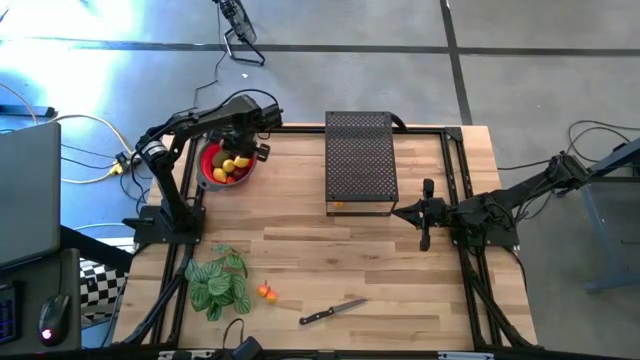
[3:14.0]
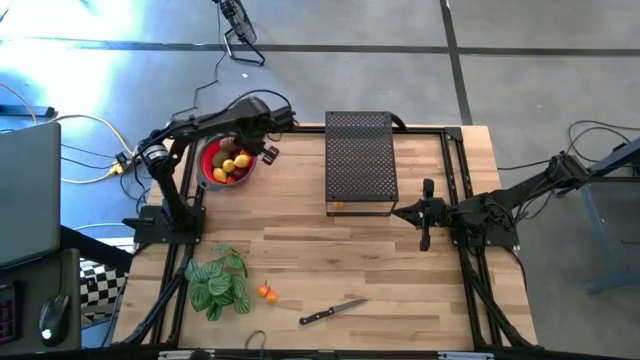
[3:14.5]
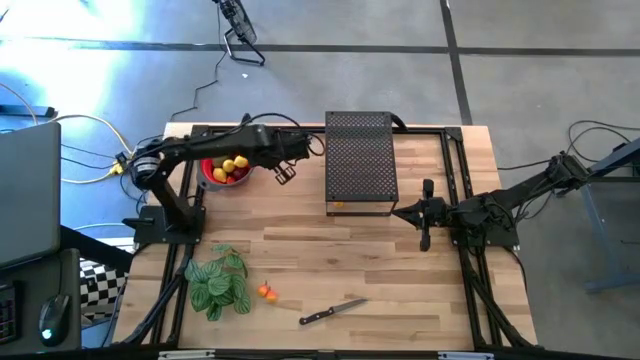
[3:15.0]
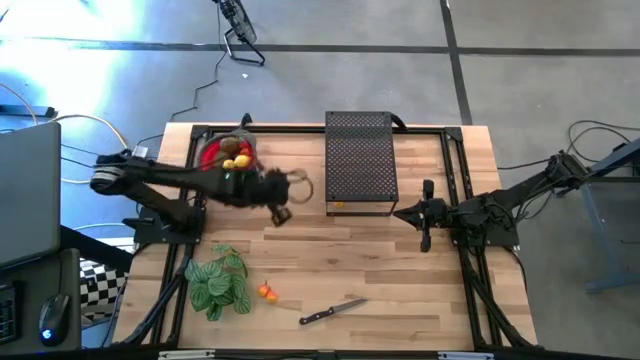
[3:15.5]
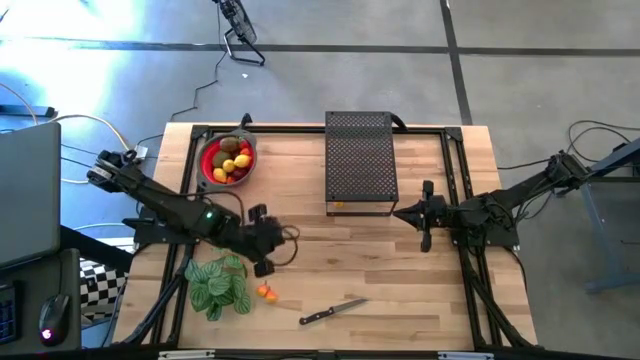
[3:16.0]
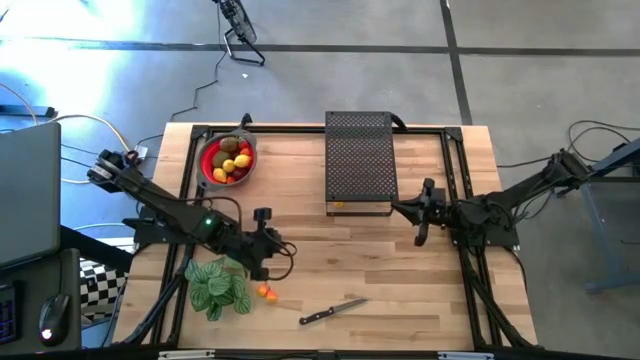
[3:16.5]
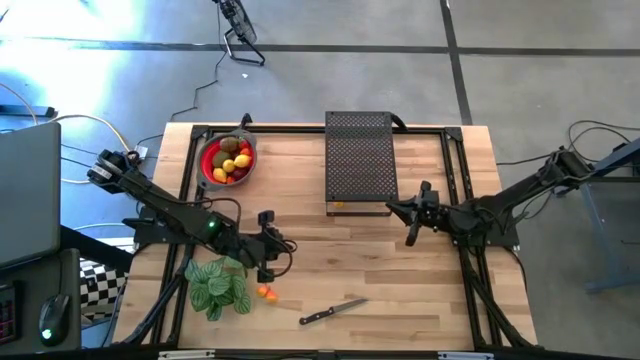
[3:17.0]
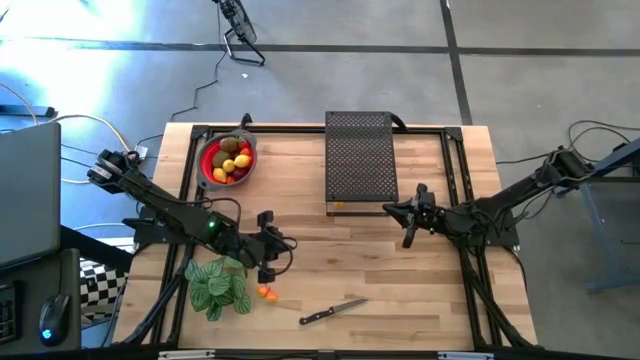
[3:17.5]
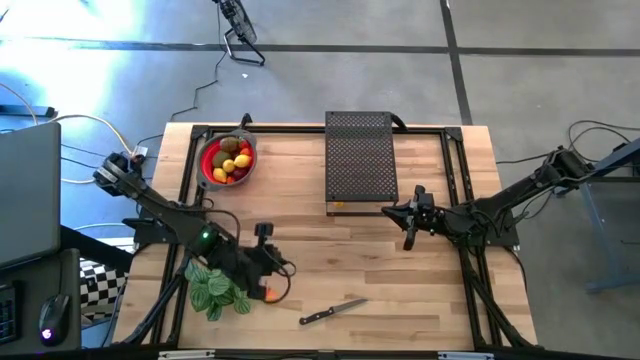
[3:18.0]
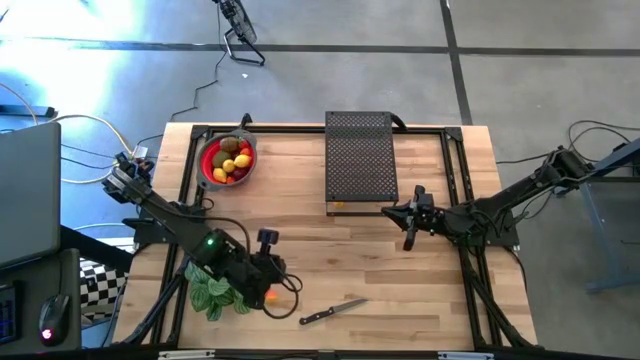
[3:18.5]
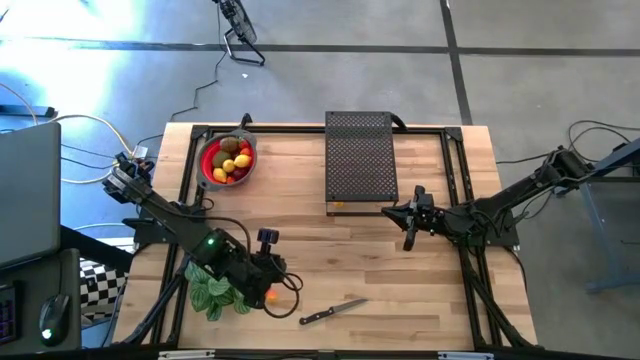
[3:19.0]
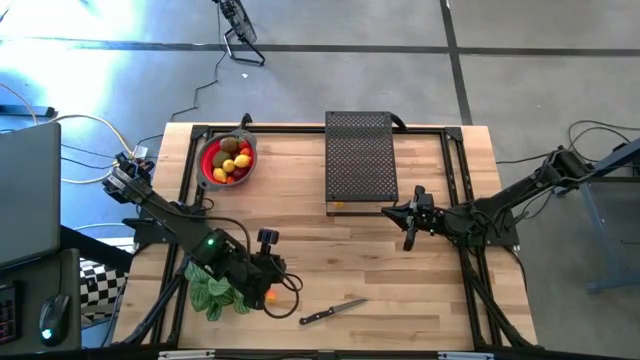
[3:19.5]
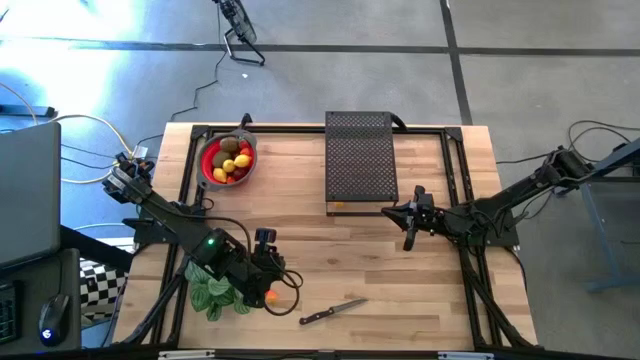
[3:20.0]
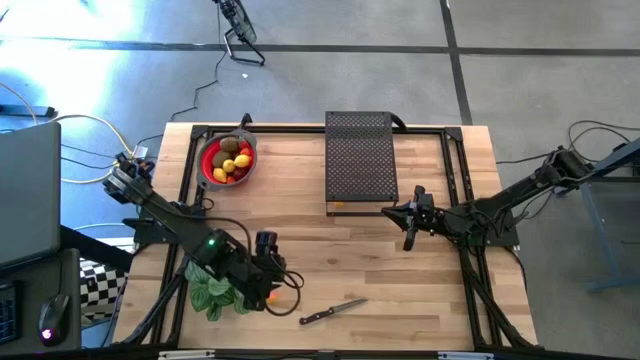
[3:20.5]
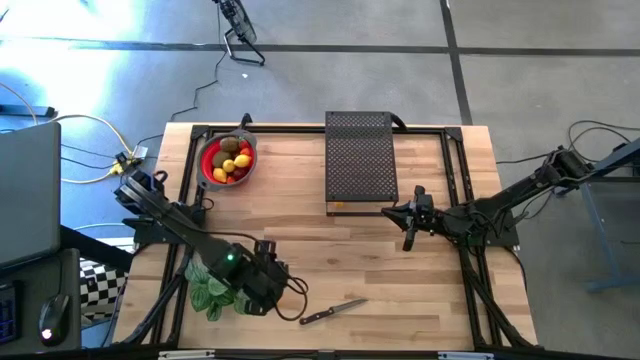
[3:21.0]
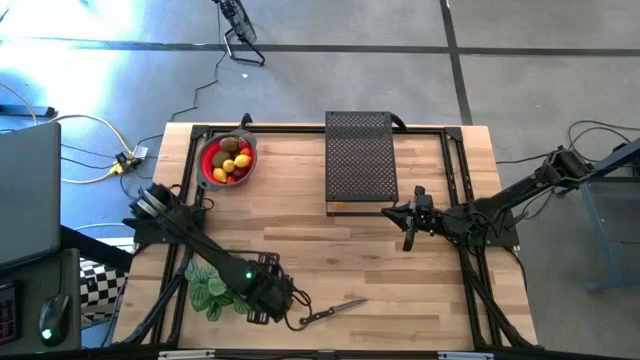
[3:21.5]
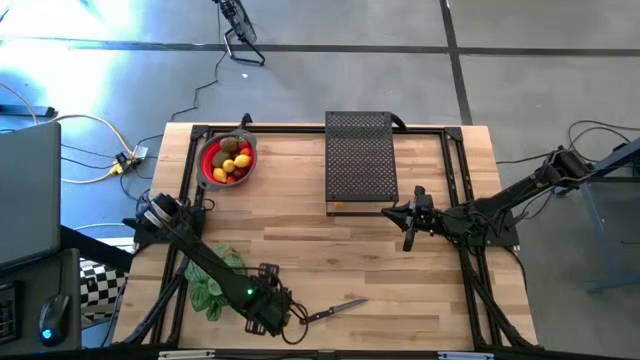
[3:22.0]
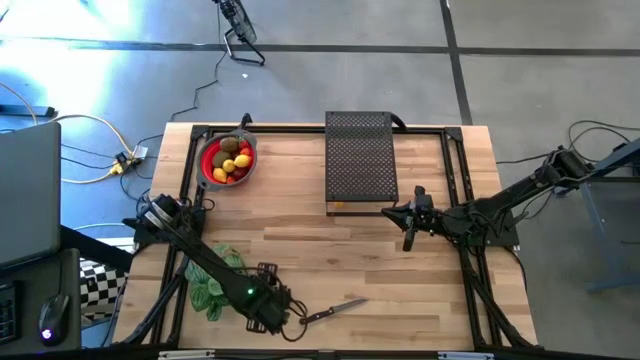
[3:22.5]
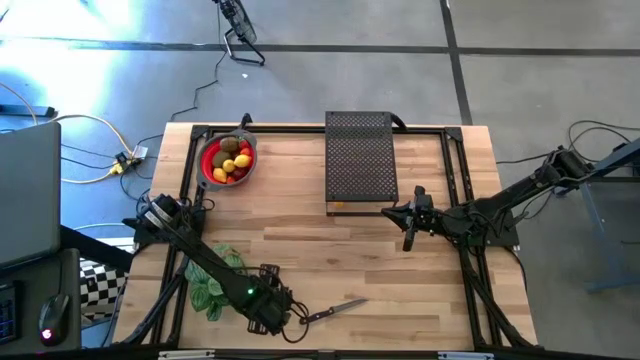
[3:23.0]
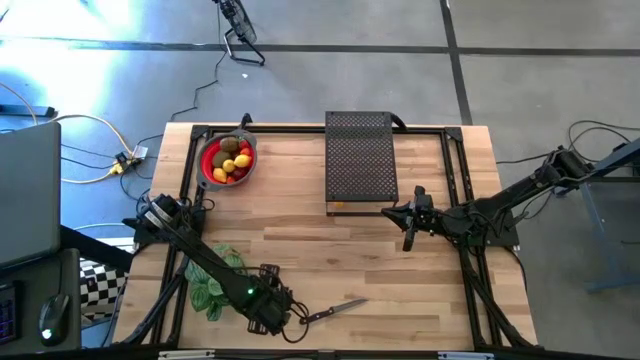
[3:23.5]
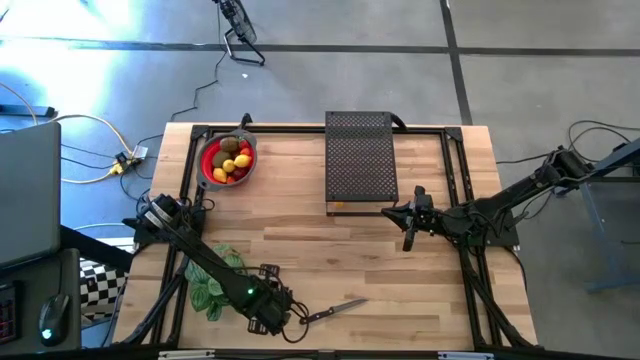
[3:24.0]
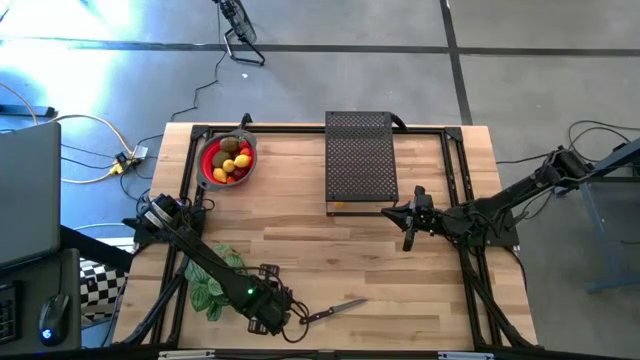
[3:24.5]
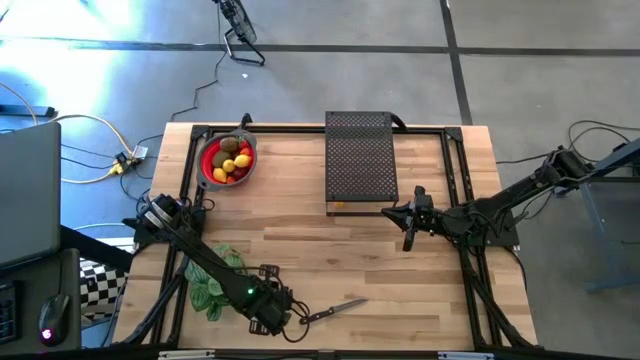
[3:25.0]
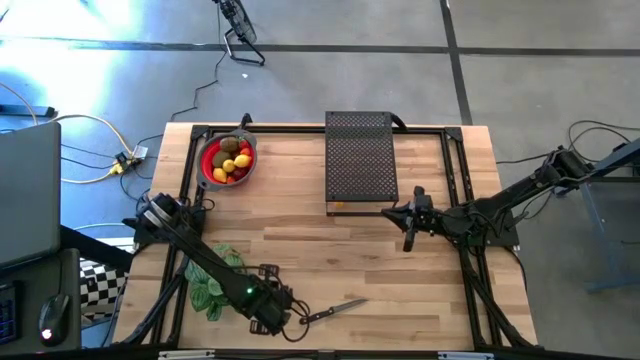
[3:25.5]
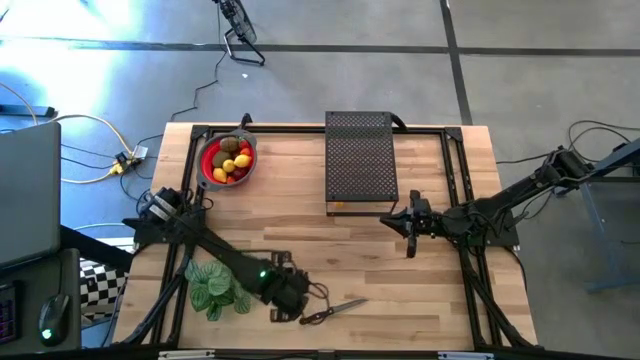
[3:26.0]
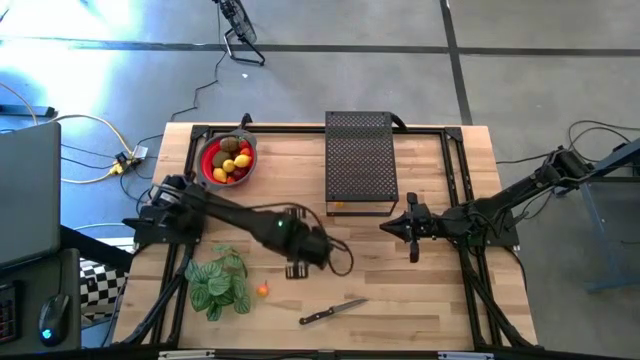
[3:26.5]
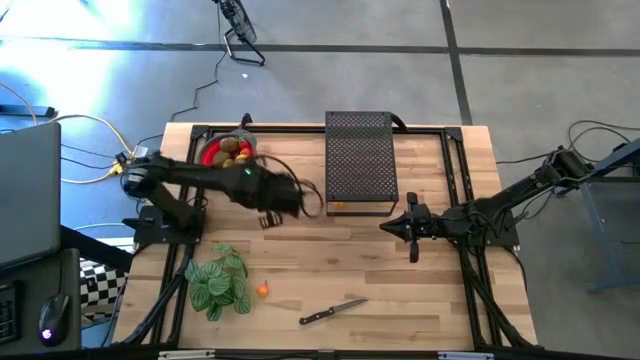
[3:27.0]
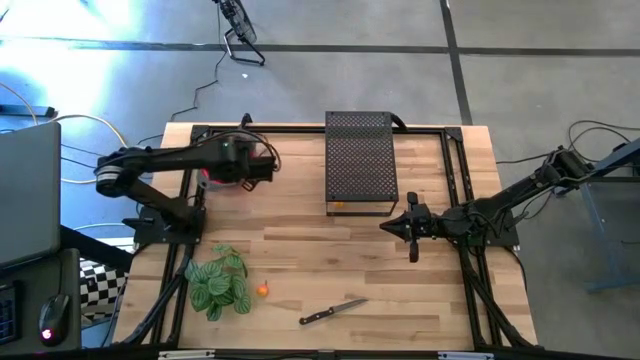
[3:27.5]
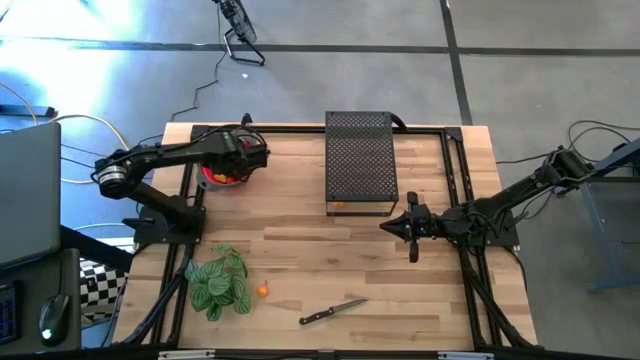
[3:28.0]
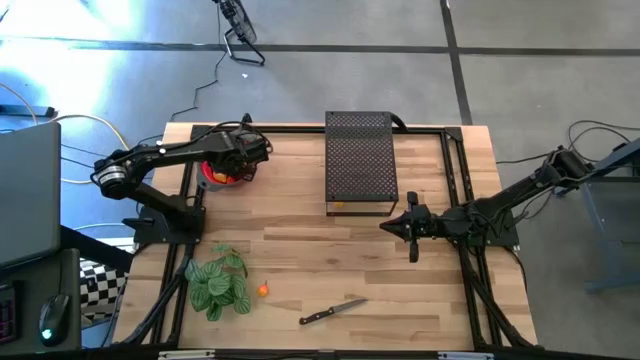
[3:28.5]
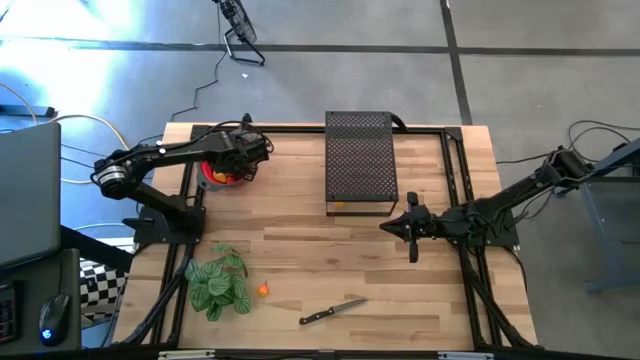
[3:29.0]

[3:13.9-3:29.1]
Task: Pick & Place Fruit
Put the orange pear into the strainer bowl

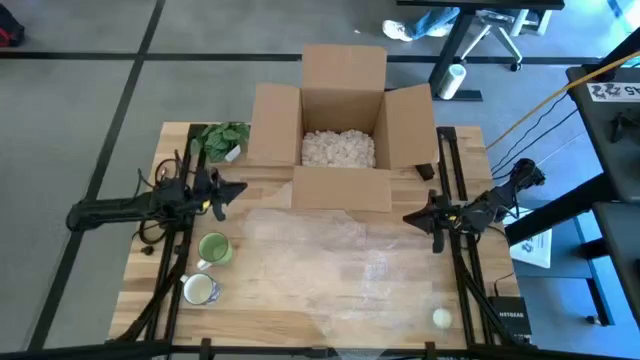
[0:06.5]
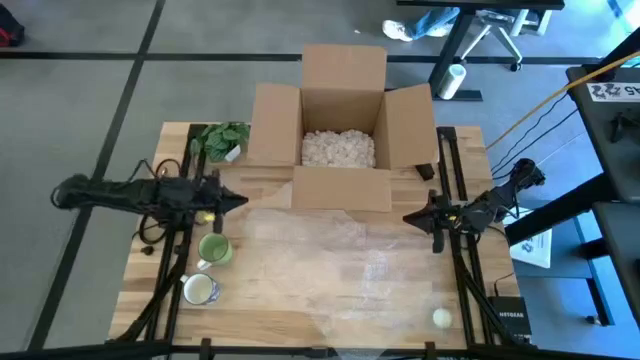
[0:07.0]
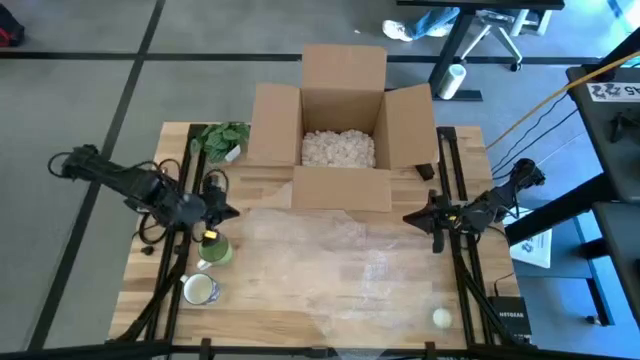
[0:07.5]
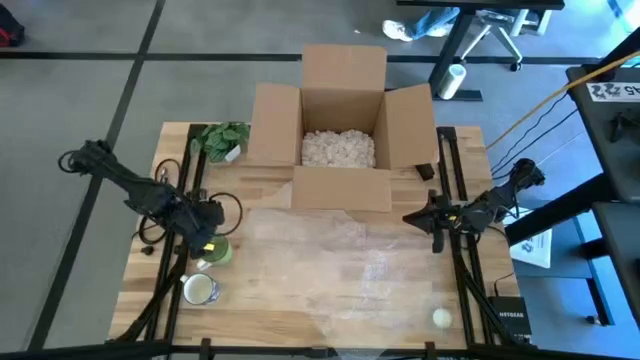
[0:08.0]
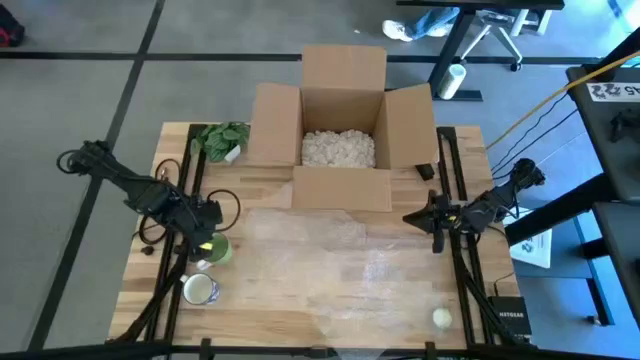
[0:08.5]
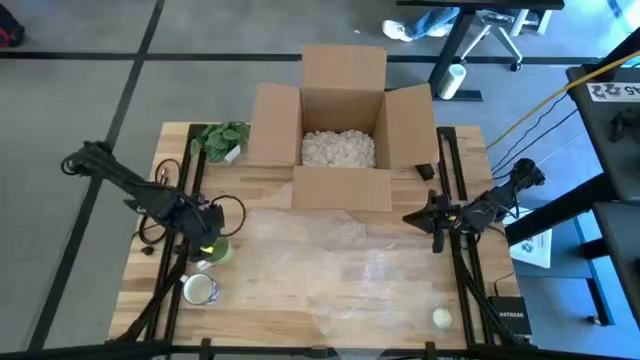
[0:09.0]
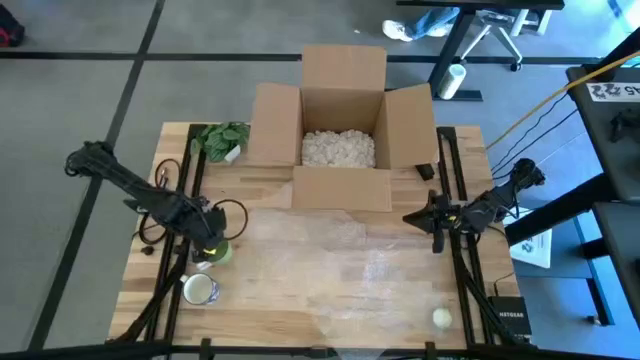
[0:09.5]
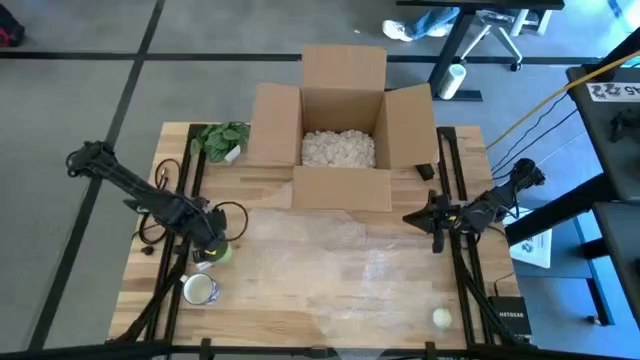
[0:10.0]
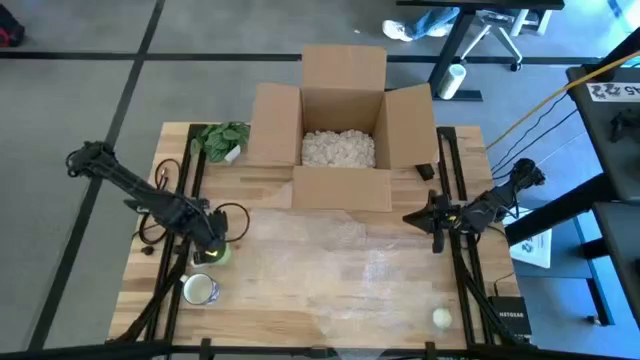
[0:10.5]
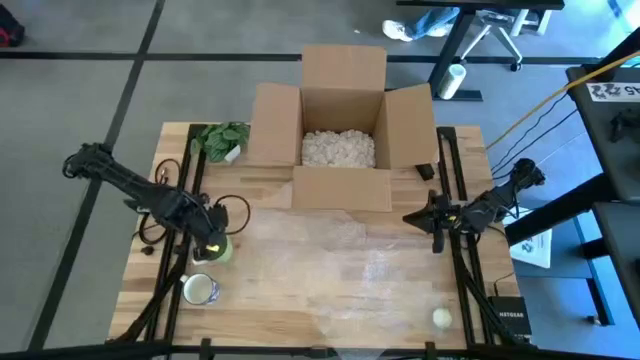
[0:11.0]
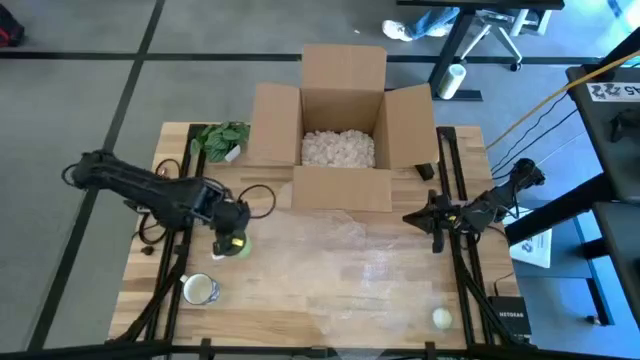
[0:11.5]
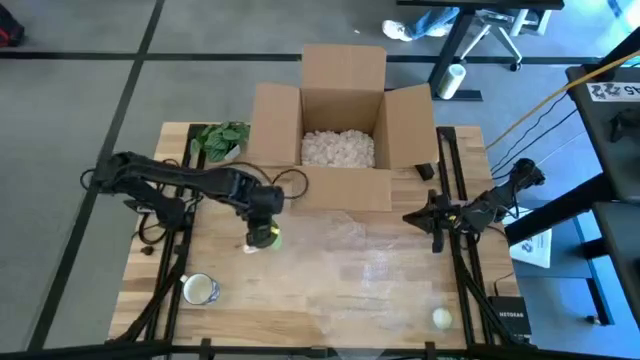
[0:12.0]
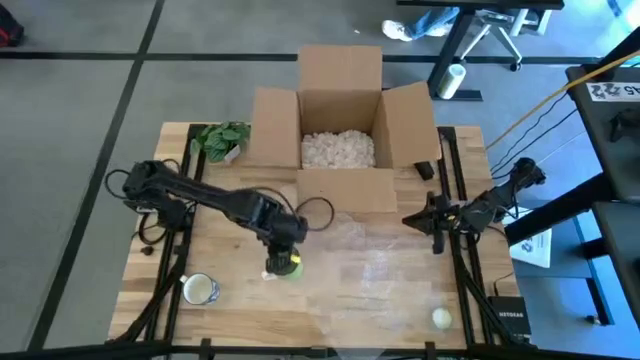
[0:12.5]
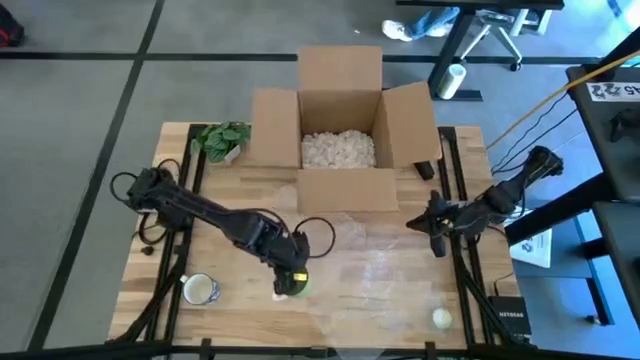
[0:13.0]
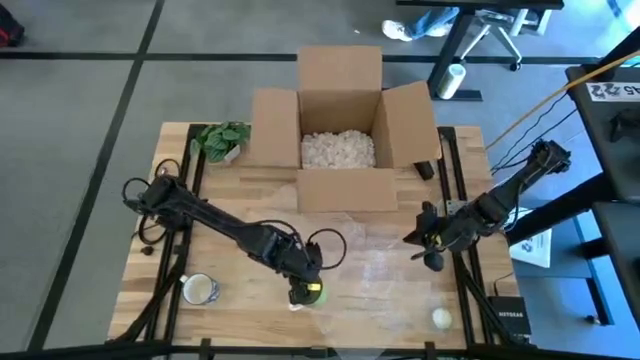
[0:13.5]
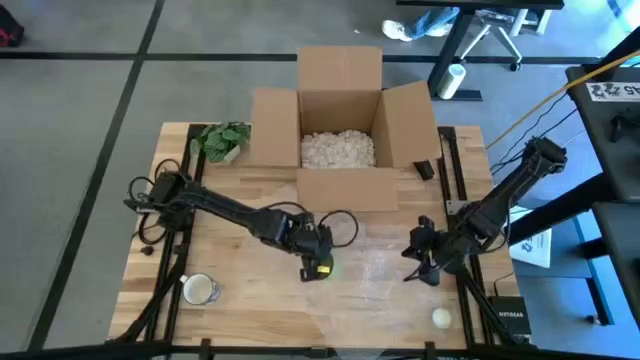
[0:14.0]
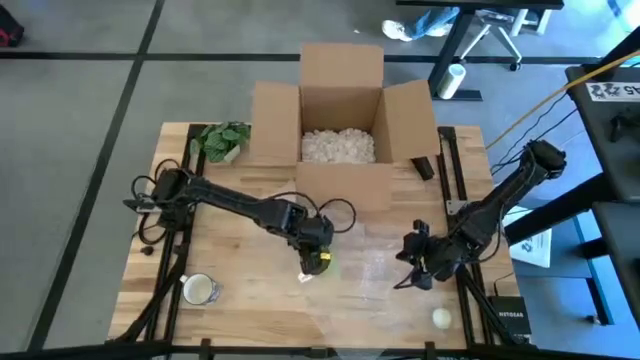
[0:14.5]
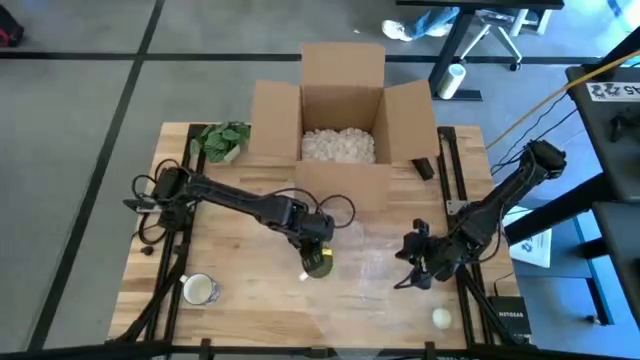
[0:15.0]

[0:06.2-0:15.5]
Task: wrap mug
Put the green mug on the bubble wrap
